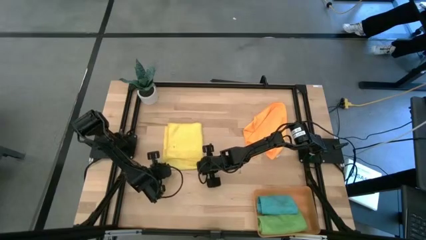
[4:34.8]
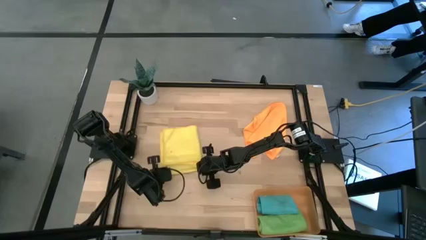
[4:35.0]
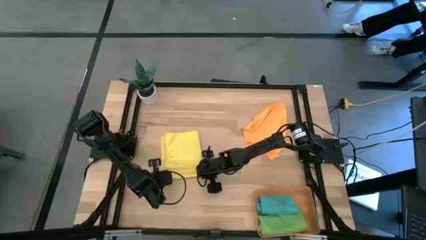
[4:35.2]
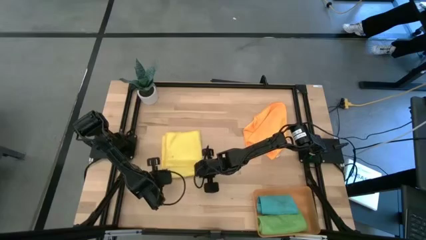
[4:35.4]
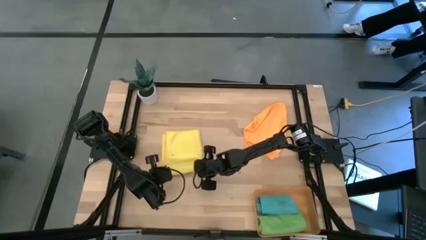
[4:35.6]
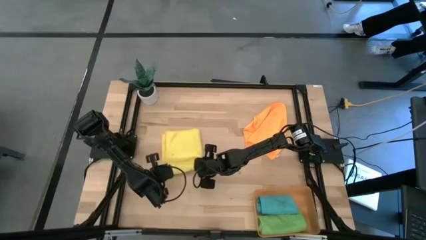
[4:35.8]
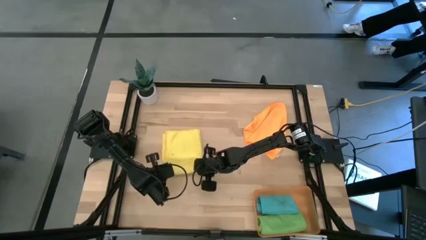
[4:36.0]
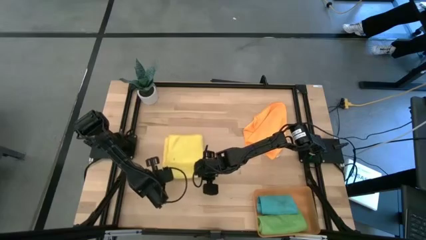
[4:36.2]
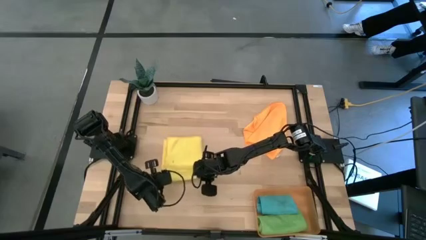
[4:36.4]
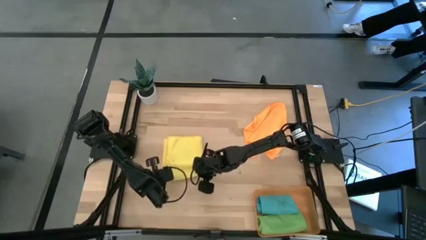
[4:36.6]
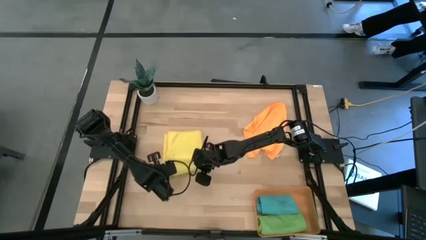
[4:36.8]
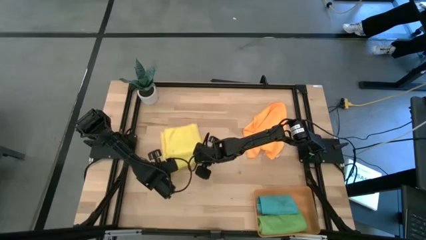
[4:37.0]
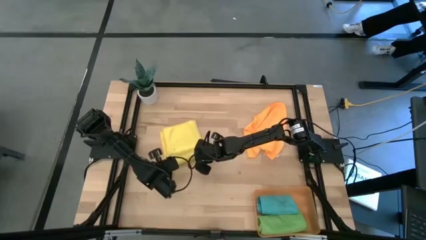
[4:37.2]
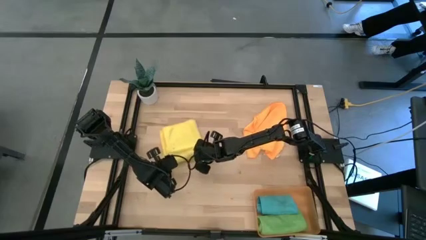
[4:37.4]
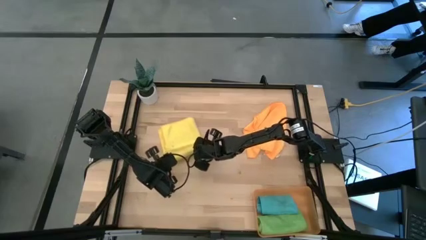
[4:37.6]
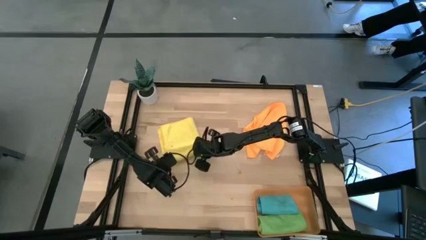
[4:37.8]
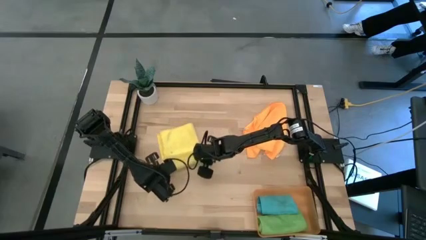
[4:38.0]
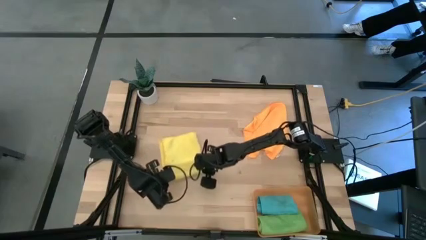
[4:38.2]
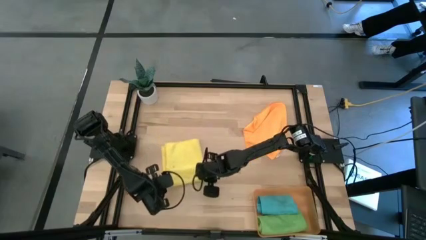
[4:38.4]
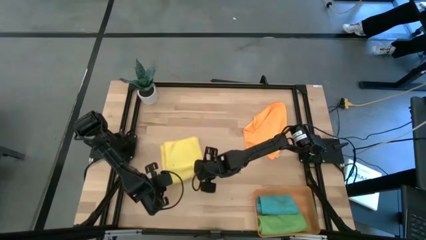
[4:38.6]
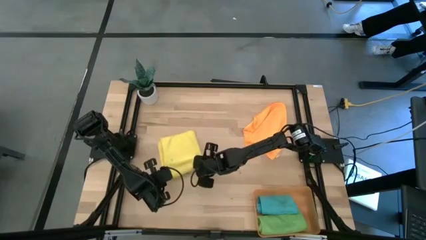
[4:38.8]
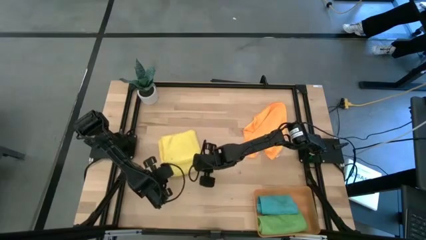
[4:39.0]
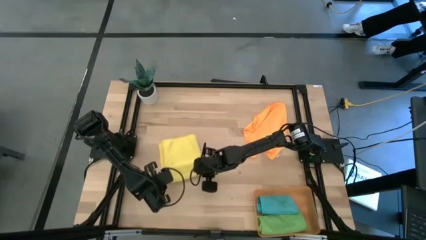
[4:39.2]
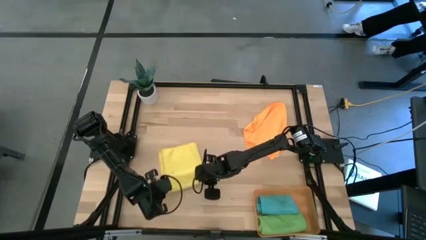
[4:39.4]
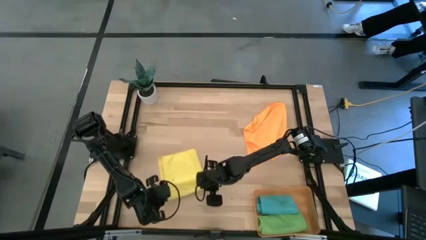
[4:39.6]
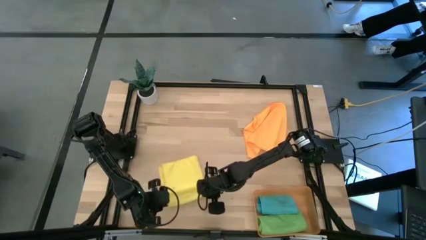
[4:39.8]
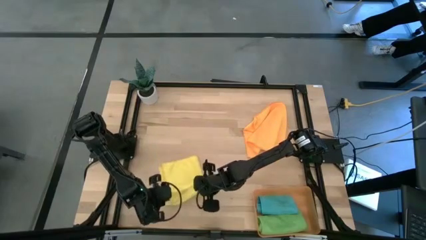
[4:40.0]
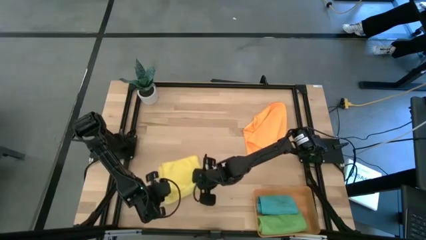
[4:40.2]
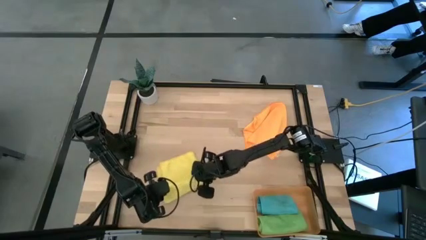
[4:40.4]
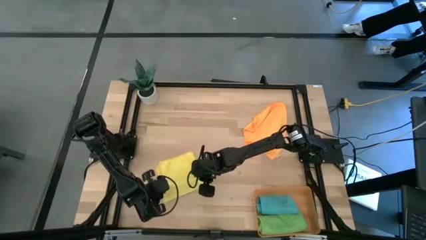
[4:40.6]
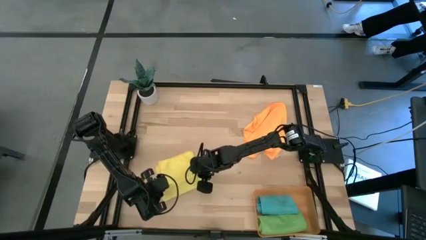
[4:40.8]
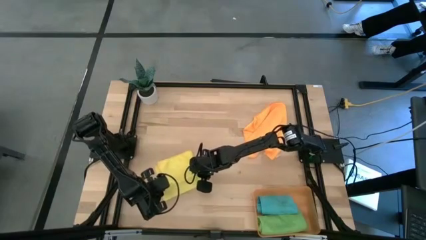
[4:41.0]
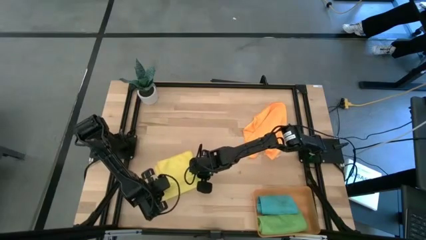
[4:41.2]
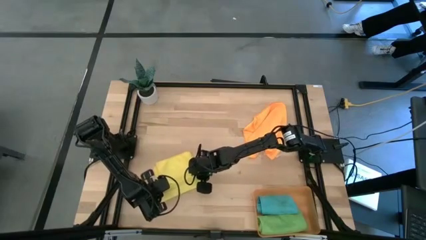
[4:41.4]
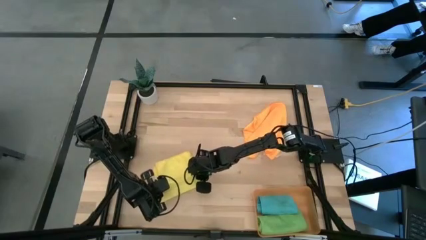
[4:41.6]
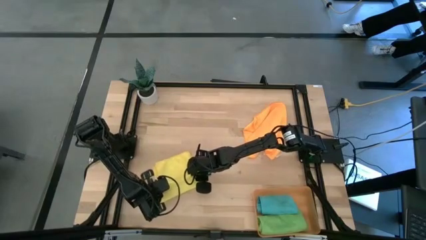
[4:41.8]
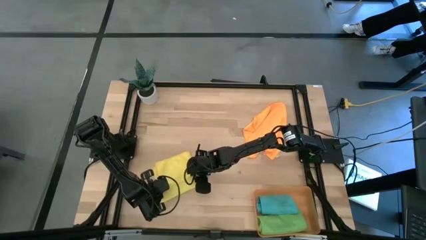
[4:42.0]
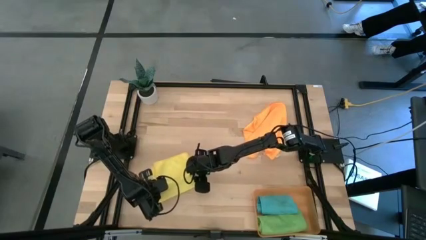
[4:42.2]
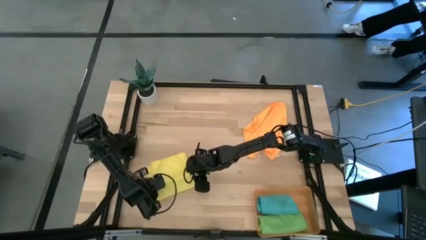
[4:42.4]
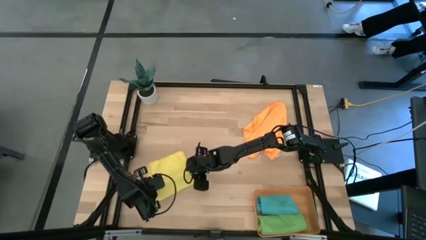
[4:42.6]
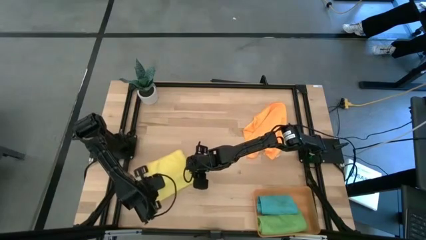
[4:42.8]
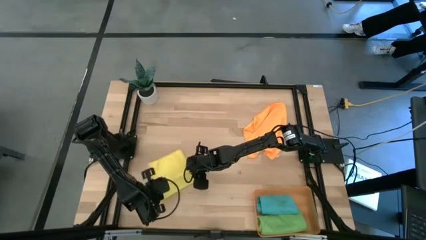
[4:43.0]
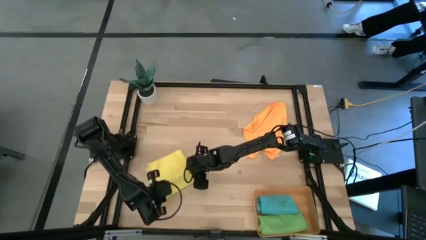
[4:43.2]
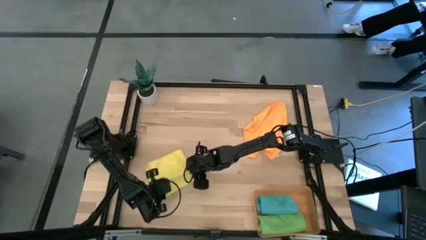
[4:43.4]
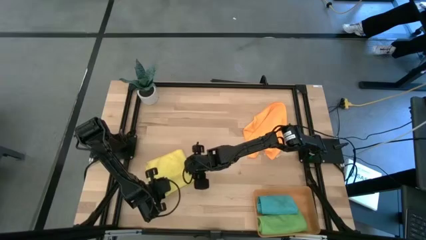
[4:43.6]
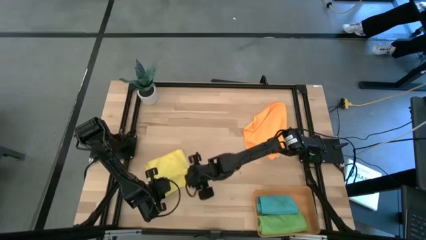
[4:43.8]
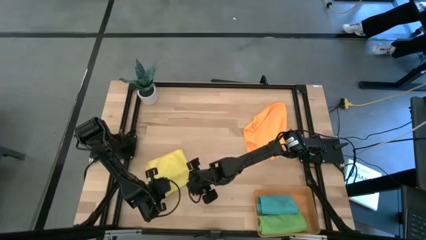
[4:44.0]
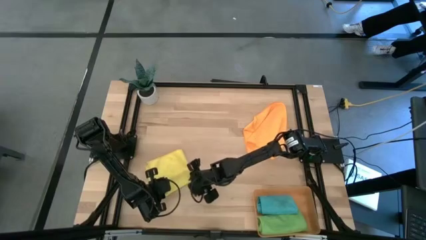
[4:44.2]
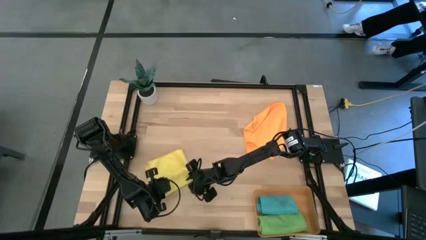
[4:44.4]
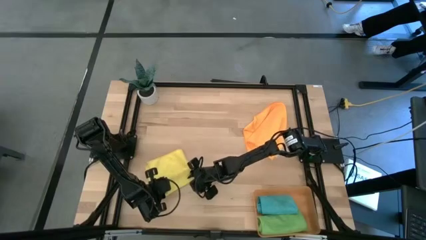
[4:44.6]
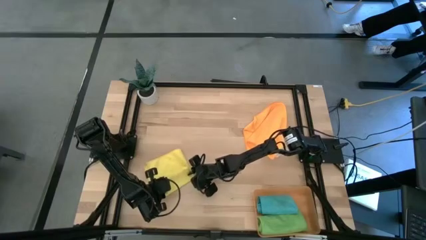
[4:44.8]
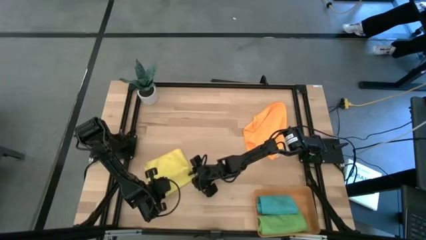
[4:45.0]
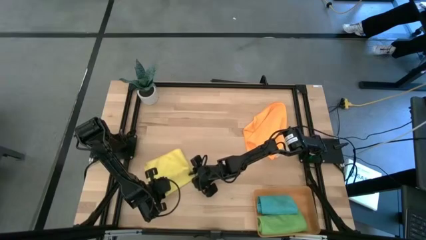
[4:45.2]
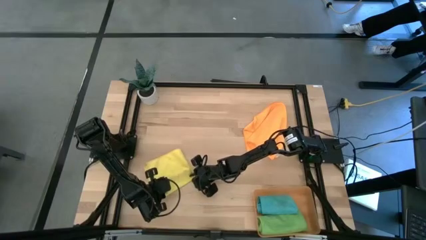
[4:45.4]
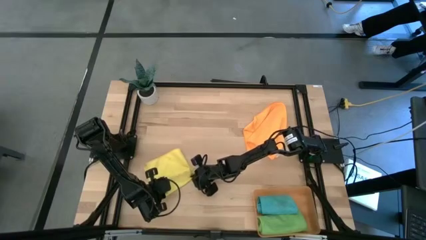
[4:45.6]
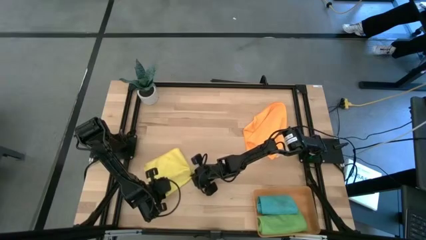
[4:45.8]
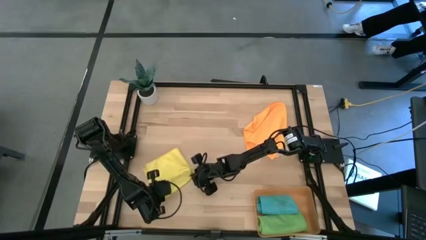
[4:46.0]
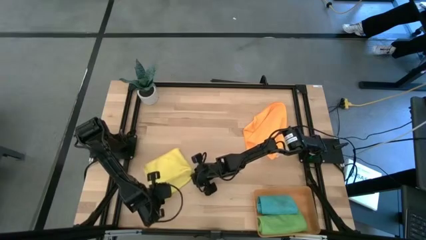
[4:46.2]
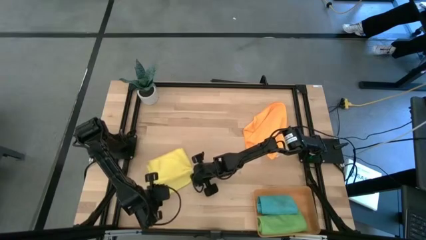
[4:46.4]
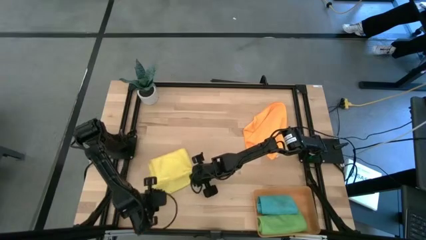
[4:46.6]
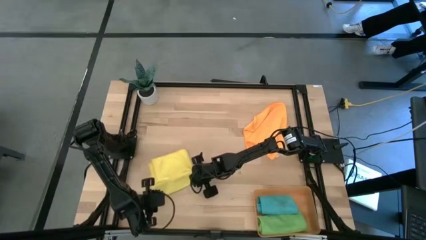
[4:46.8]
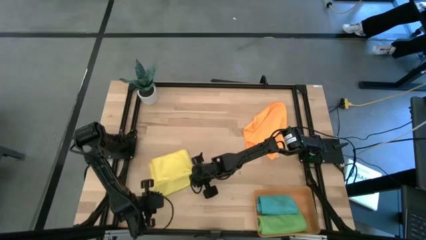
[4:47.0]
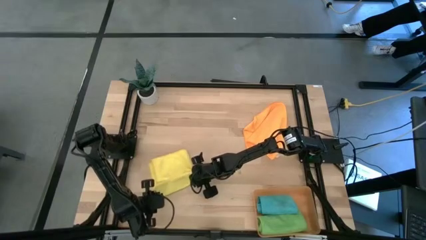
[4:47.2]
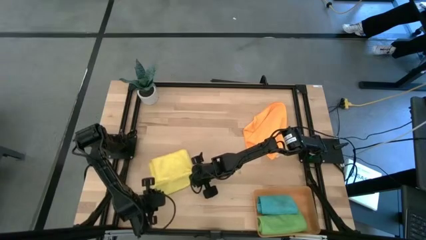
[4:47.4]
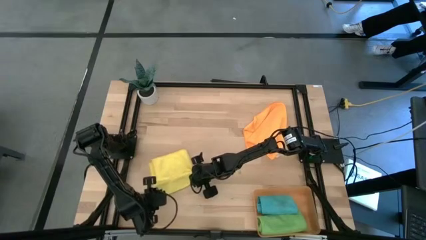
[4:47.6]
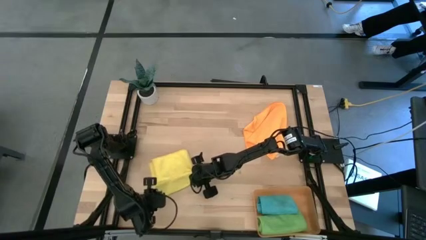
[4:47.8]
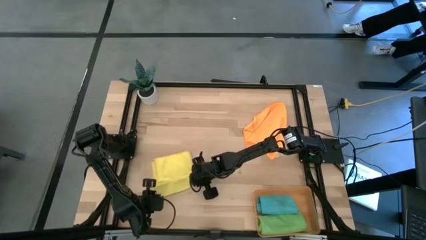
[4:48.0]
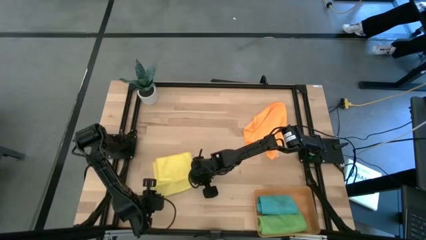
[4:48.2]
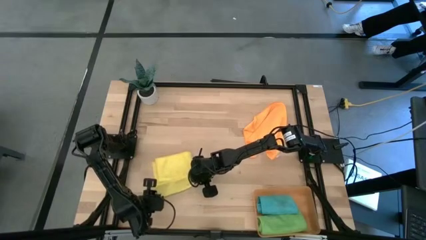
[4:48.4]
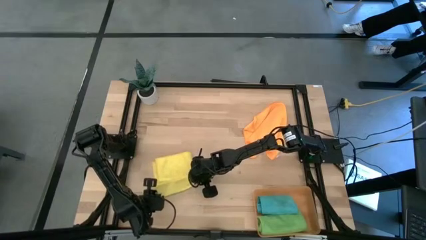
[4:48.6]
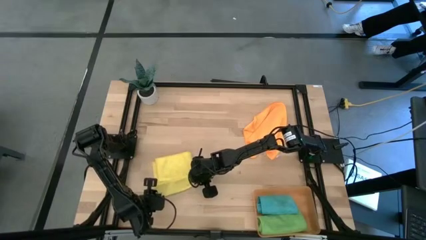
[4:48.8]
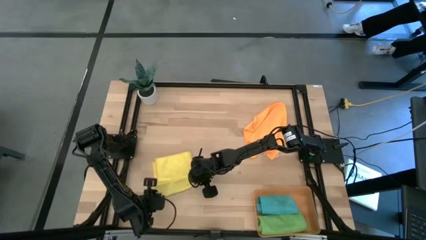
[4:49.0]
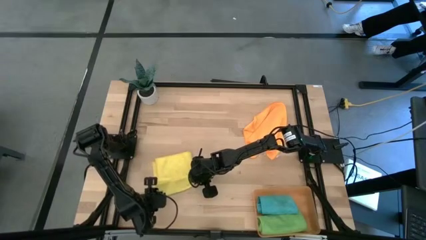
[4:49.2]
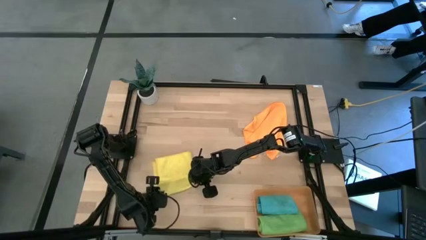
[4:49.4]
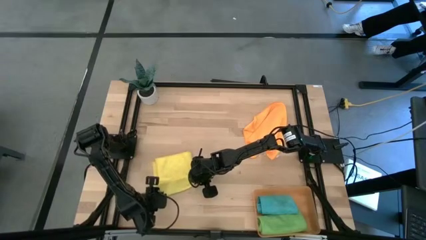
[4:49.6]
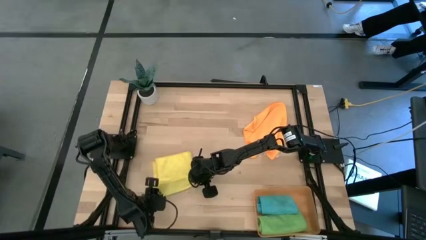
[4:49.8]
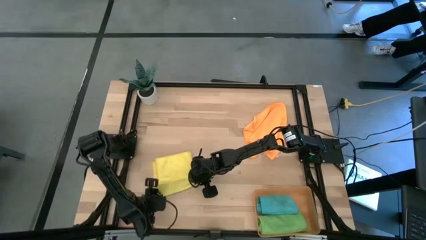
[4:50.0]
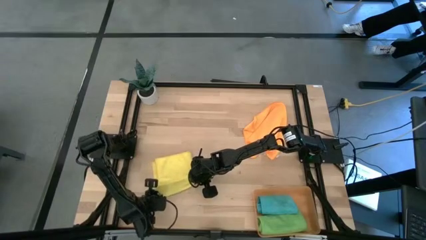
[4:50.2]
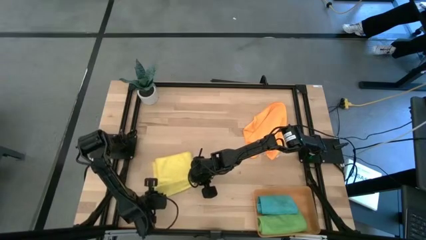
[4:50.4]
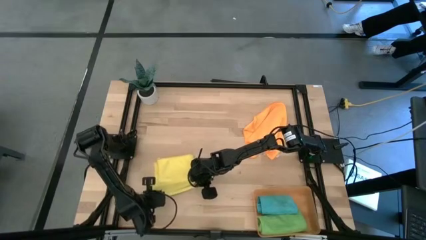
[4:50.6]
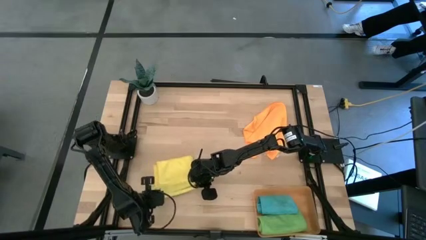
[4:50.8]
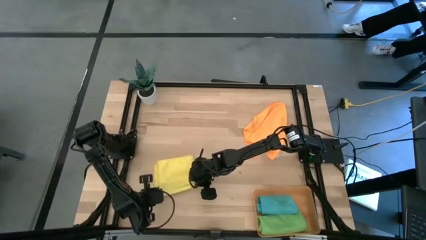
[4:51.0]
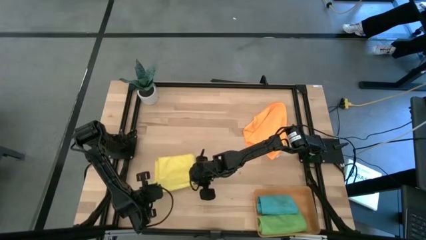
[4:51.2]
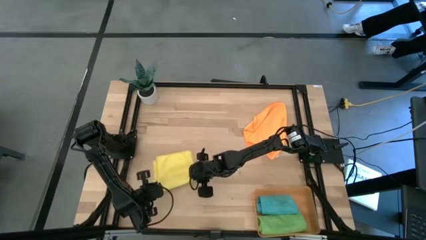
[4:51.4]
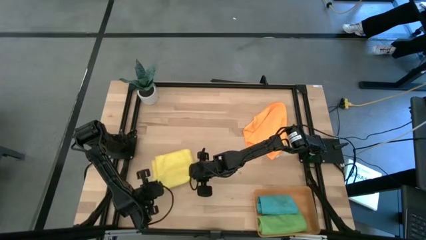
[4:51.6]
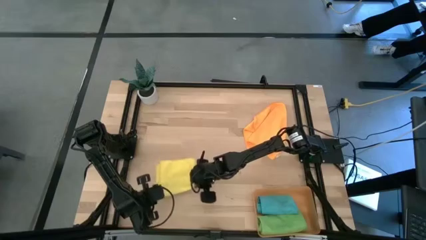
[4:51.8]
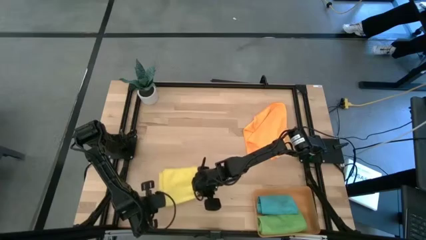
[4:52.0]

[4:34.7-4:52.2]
Task: Roll microfiber towels into tight, uniform cylinder then place into a basket
Roll the yellow microfiber towel
